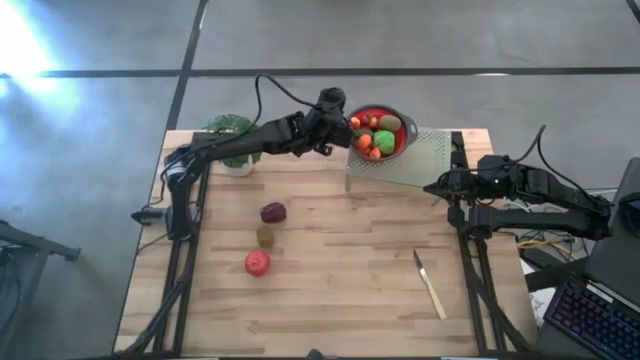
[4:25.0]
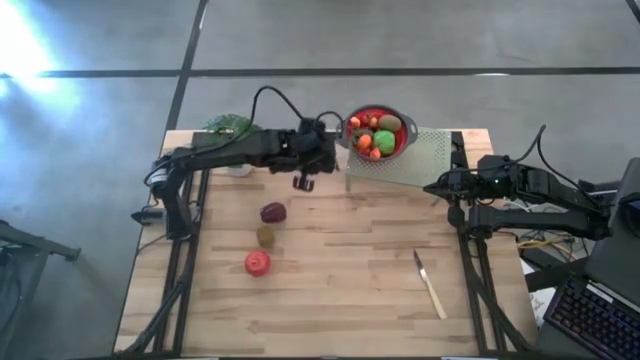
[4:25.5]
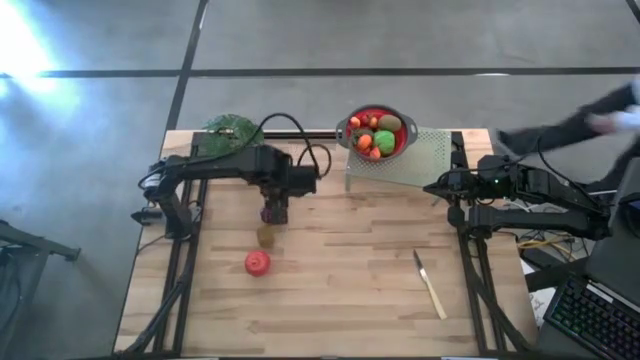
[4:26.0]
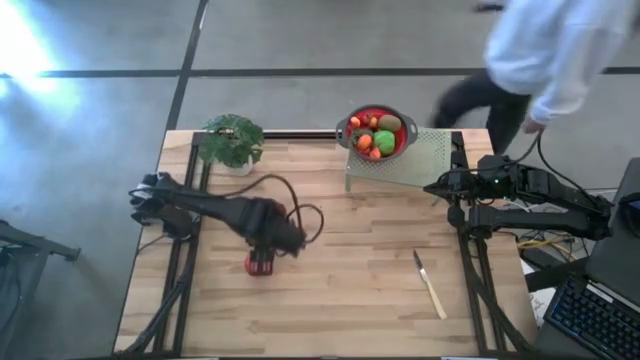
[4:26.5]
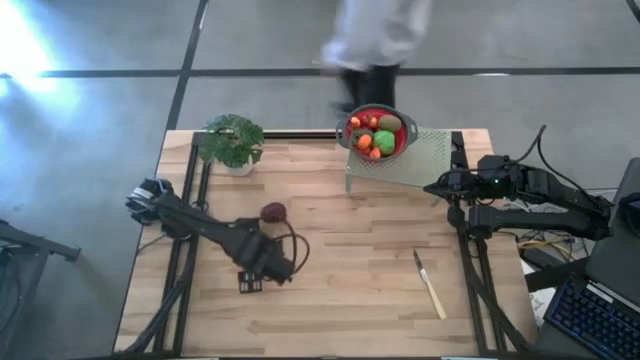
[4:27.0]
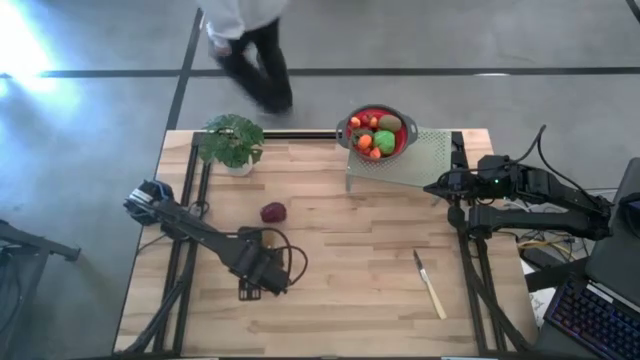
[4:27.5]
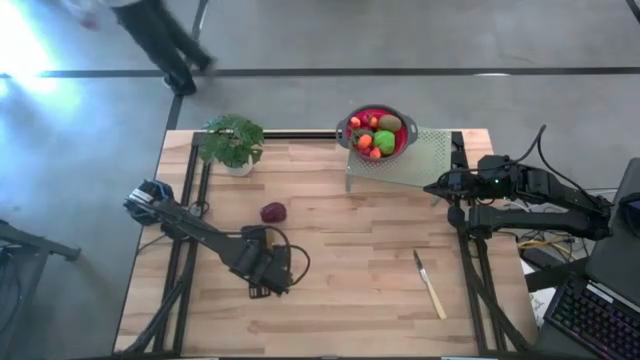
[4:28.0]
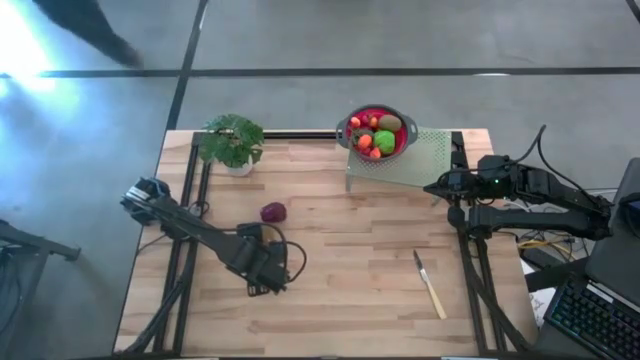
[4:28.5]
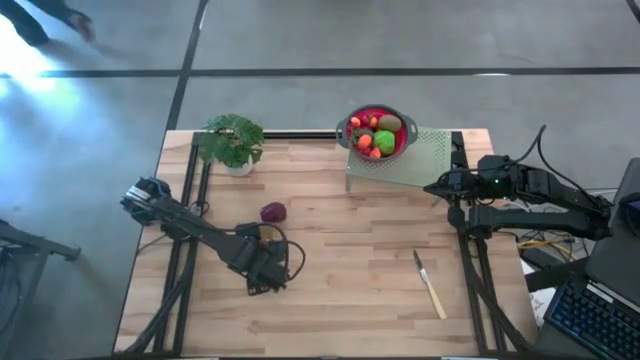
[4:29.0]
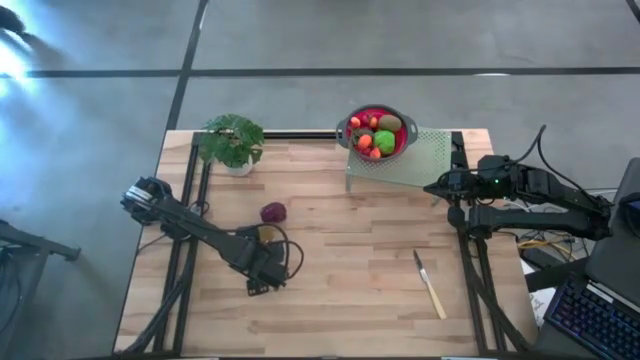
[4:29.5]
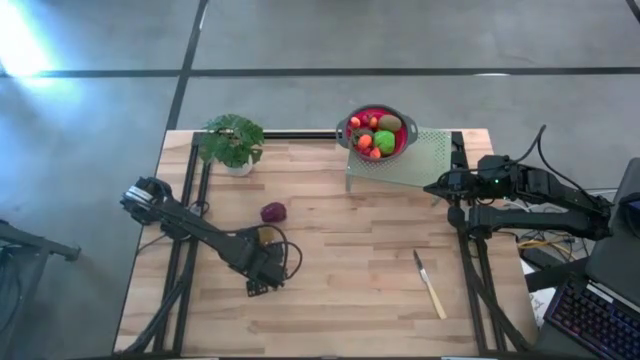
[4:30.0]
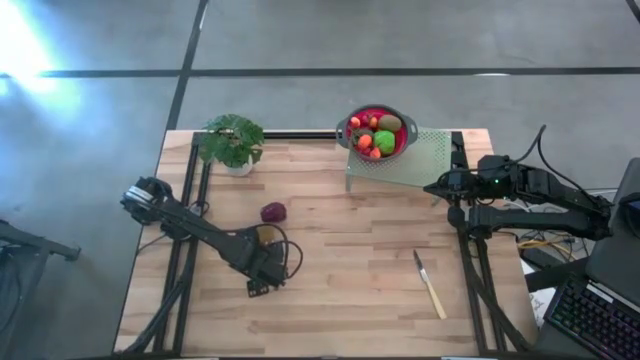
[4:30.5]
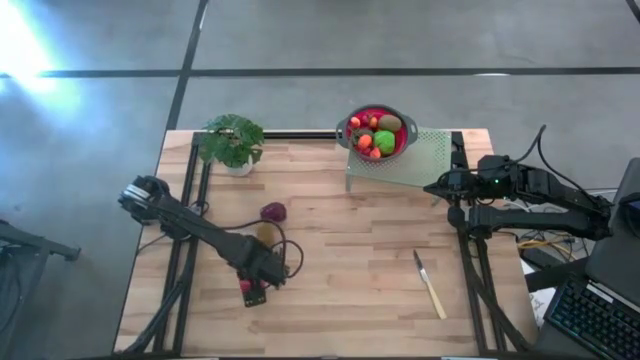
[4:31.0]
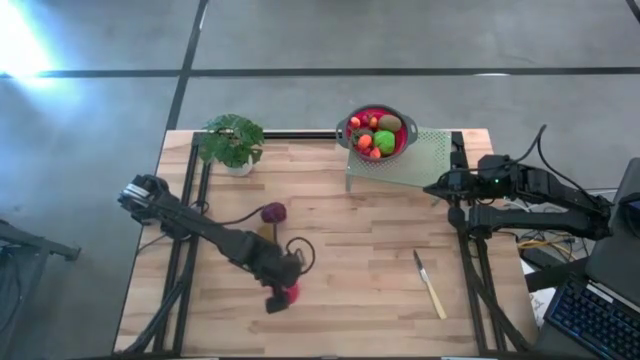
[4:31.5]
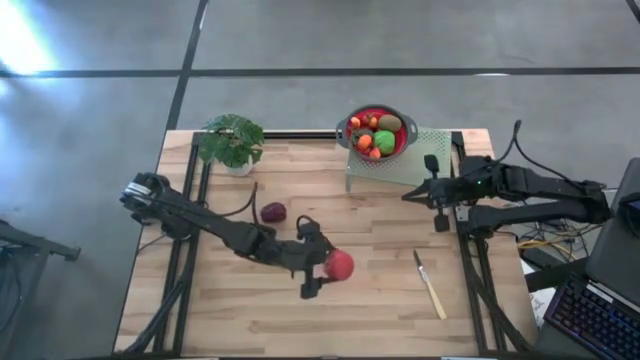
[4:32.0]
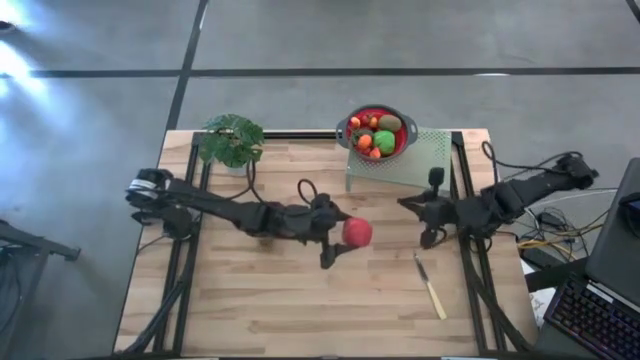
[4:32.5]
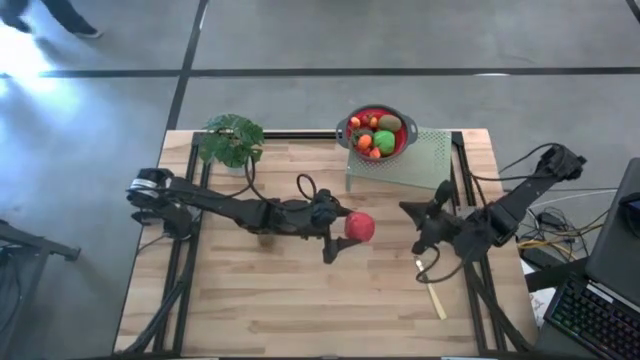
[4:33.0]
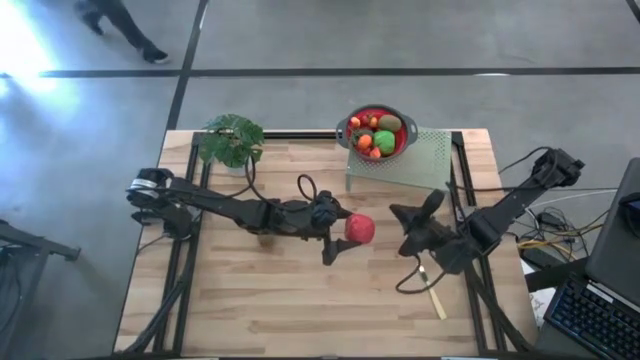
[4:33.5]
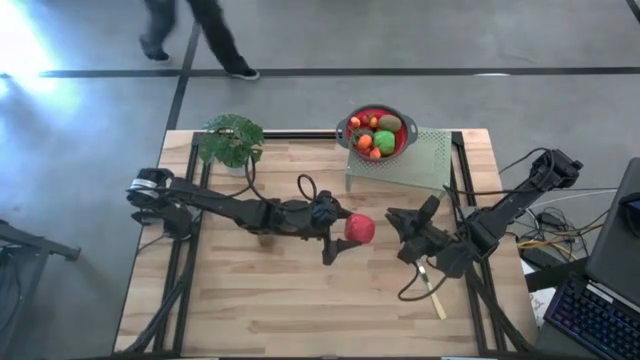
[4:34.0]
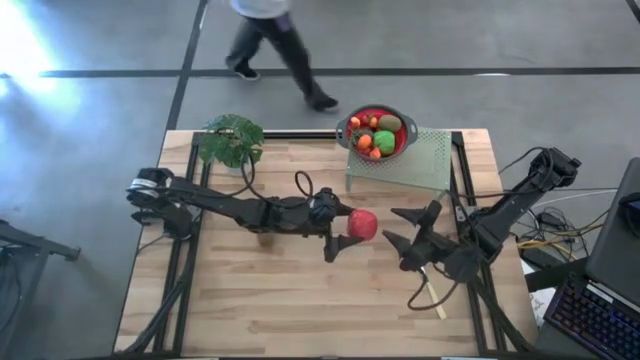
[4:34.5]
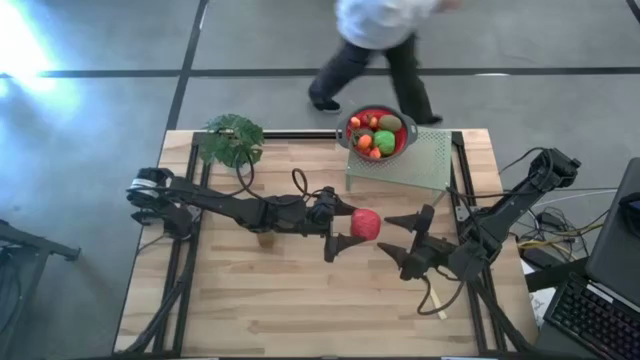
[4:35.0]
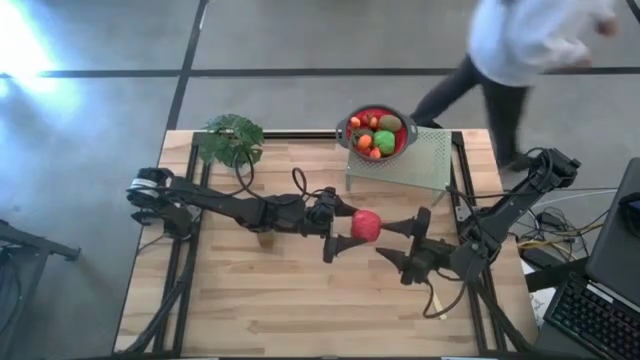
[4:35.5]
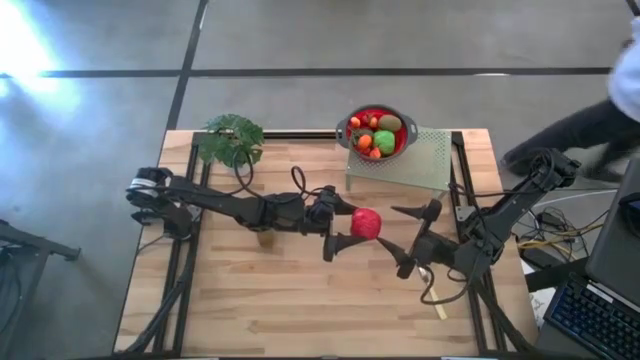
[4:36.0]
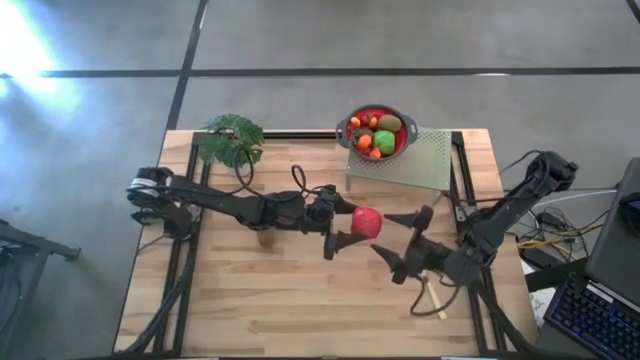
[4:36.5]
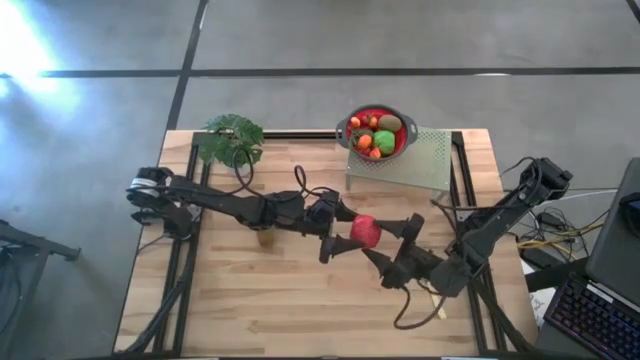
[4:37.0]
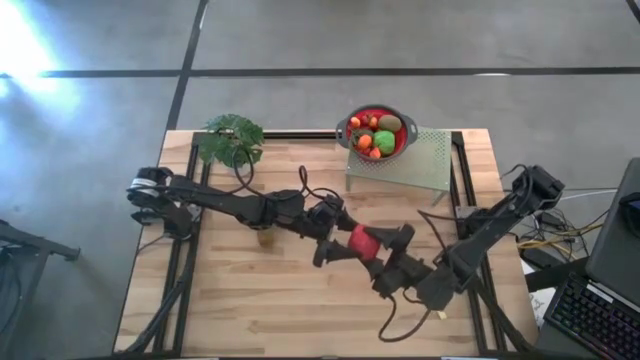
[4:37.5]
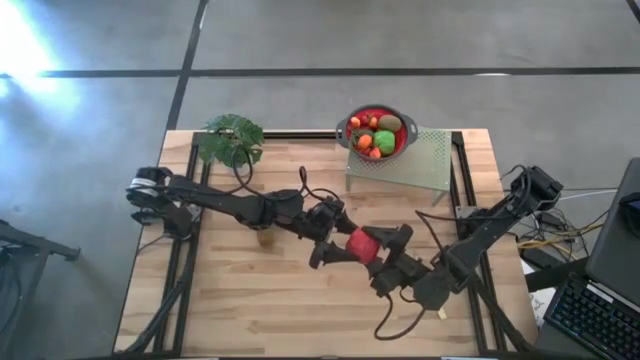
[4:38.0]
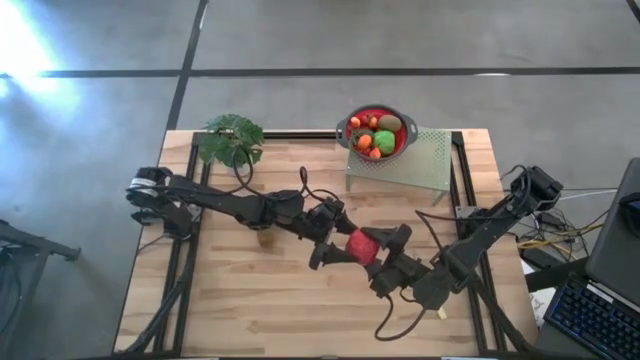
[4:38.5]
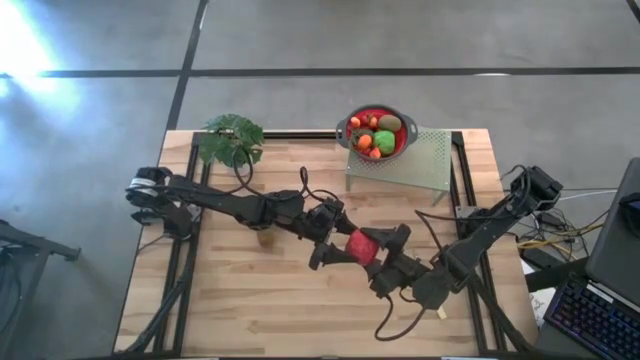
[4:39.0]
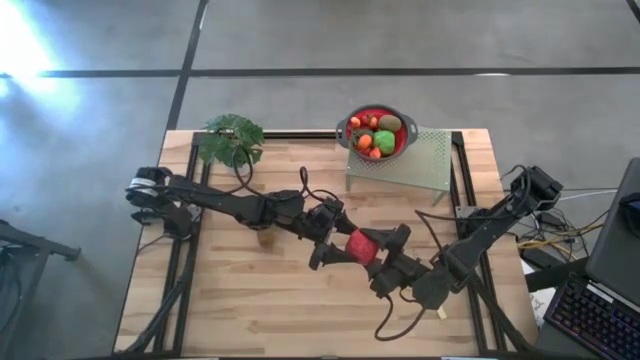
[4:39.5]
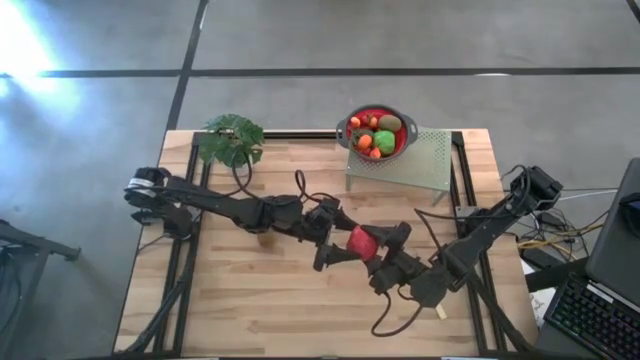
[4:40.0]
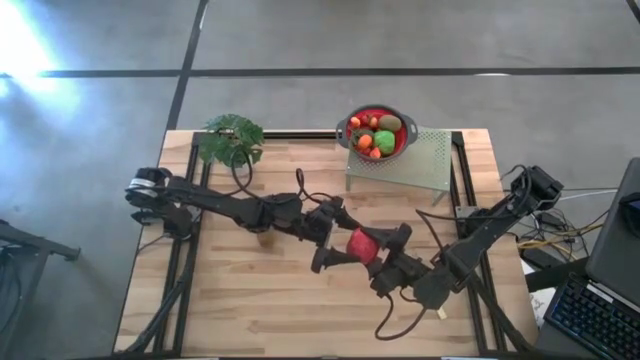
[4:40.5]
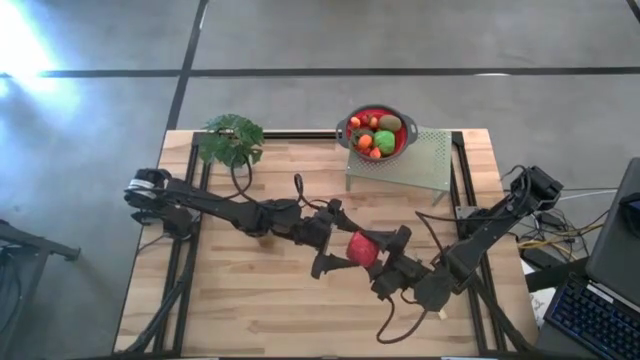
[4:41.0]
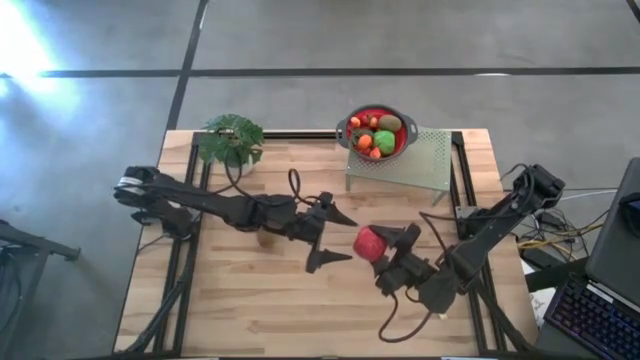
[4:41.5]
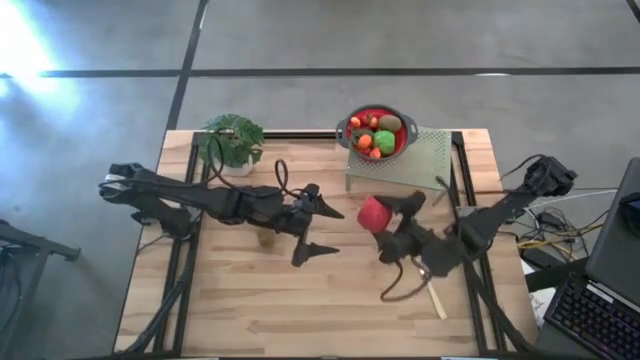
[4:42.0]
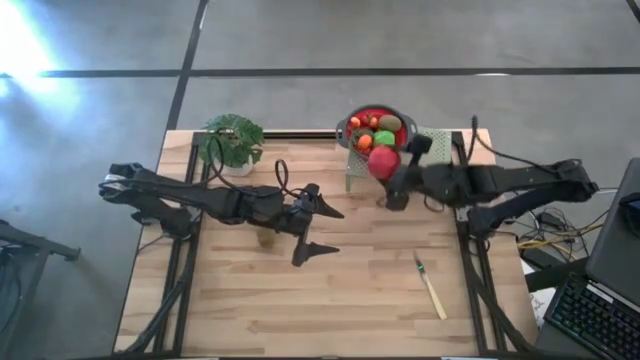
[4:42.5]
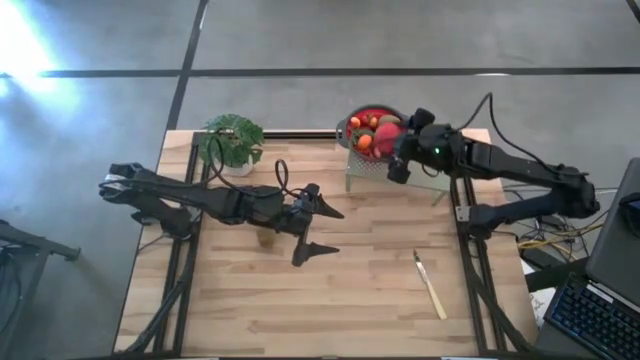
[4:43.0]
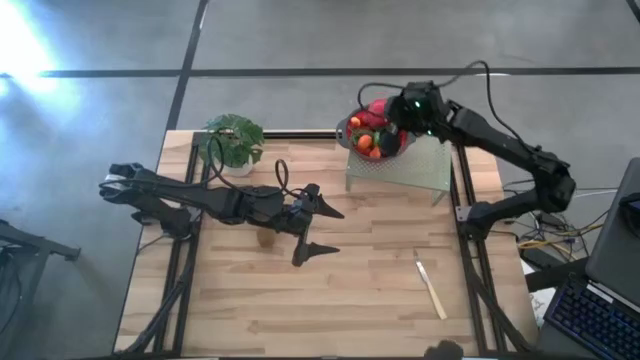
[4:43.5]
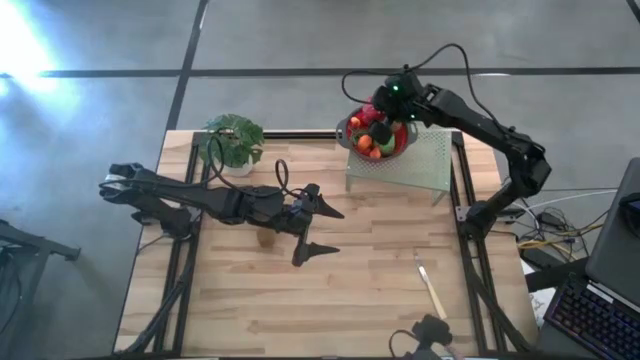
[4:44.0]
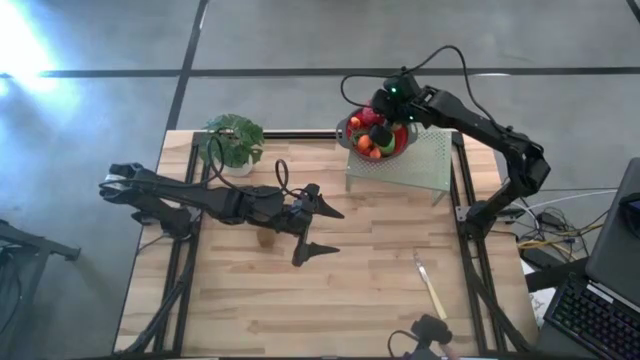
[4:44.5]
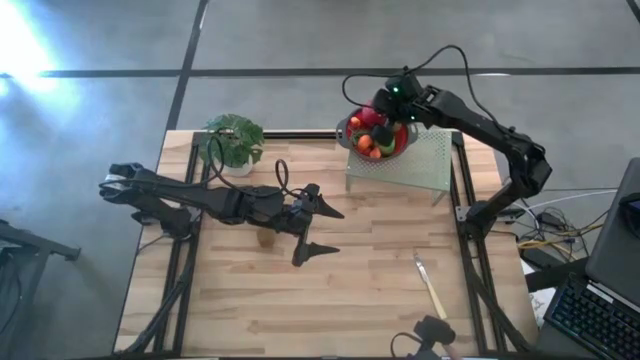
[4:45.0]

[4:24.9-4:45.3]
Task: Pick & Place Fruit
Put the red apple into the strainer bowl on the shelf
